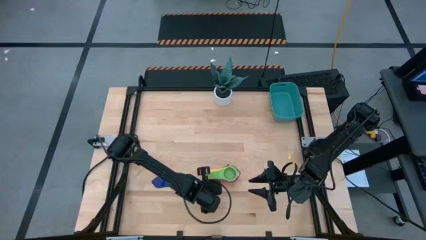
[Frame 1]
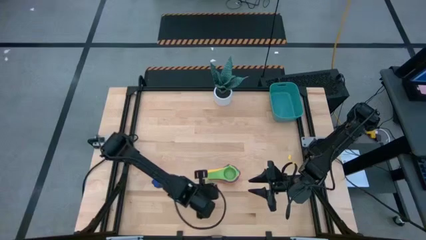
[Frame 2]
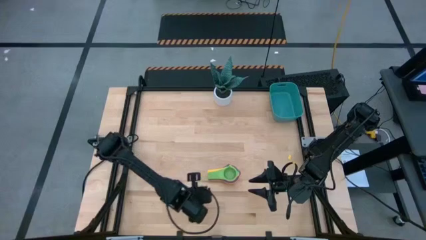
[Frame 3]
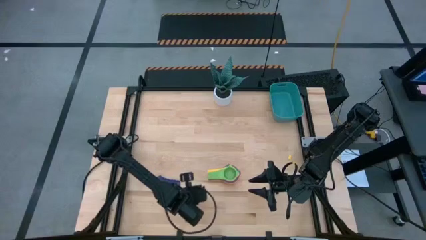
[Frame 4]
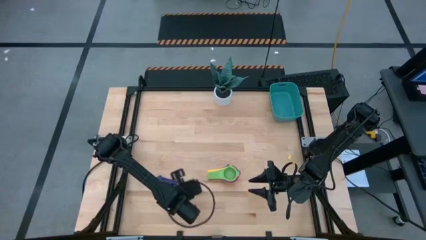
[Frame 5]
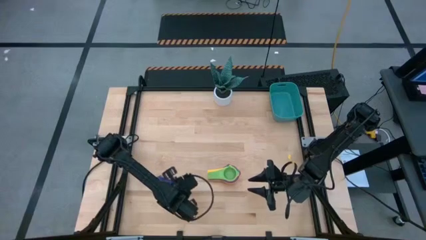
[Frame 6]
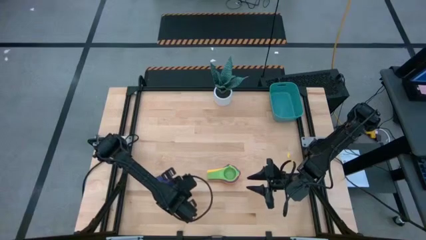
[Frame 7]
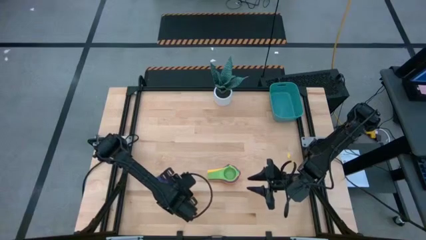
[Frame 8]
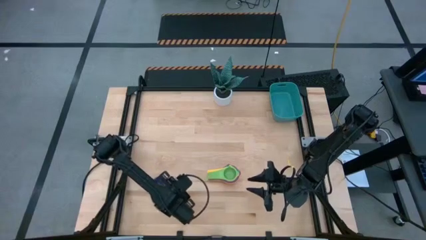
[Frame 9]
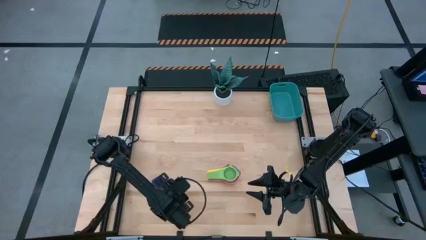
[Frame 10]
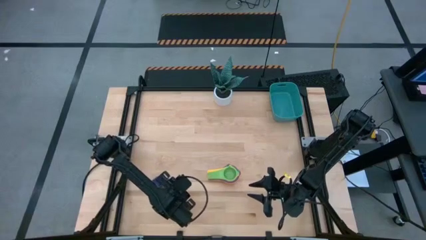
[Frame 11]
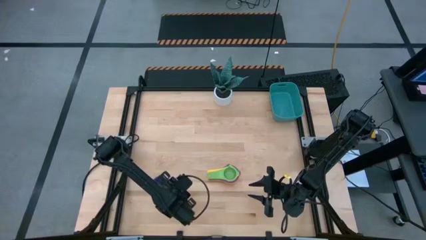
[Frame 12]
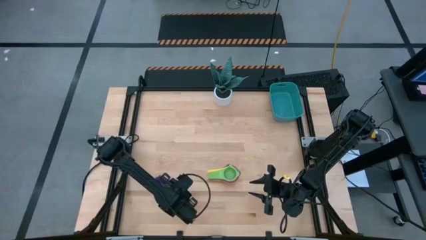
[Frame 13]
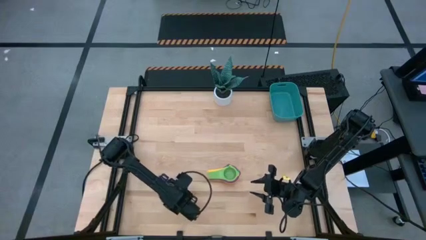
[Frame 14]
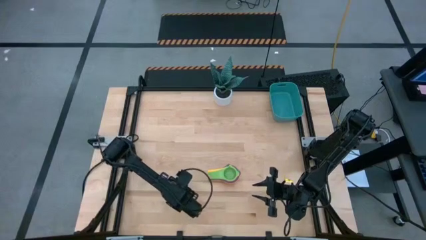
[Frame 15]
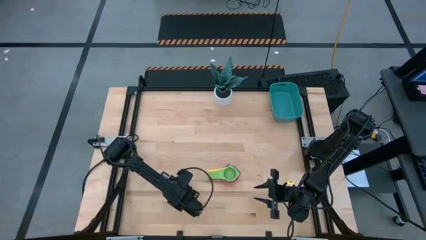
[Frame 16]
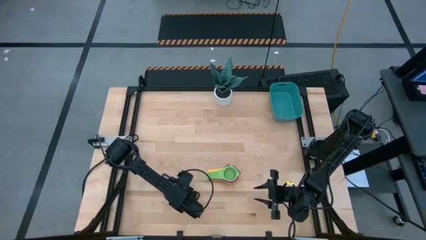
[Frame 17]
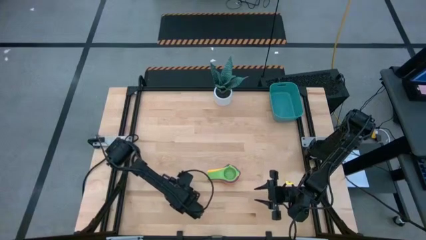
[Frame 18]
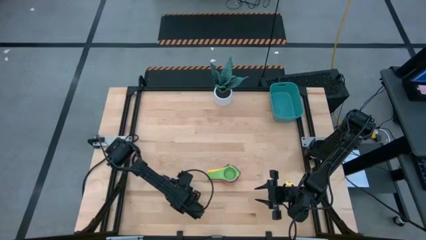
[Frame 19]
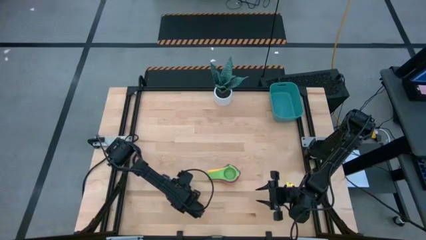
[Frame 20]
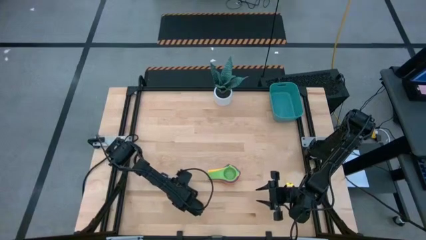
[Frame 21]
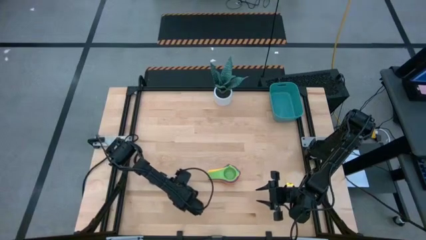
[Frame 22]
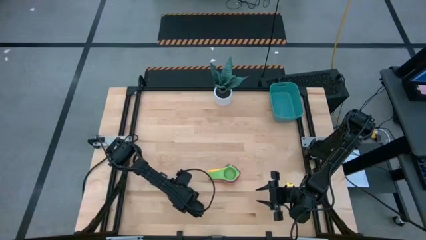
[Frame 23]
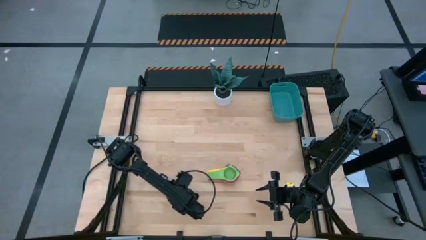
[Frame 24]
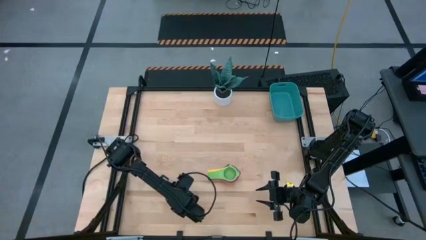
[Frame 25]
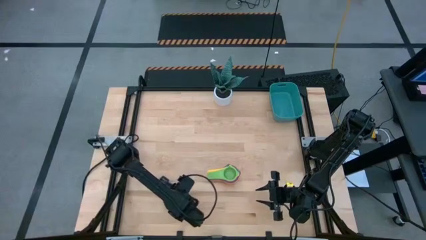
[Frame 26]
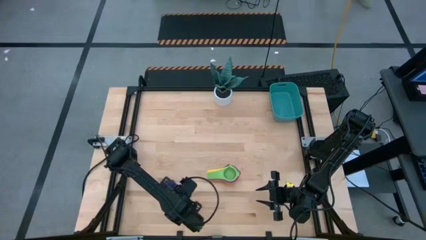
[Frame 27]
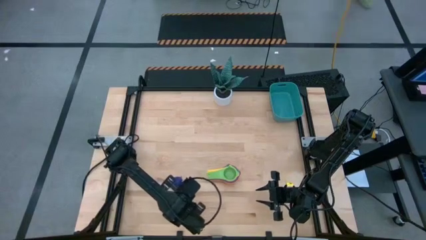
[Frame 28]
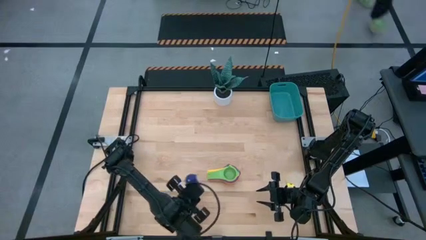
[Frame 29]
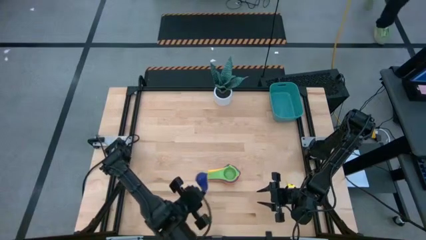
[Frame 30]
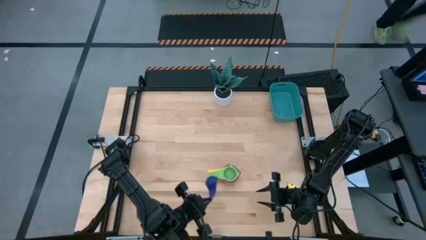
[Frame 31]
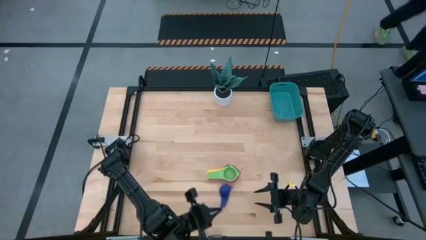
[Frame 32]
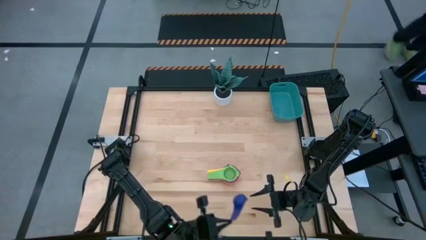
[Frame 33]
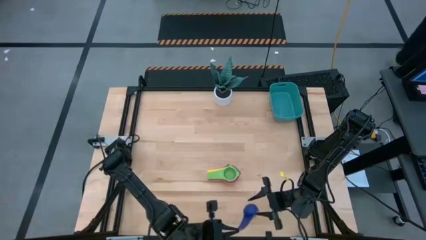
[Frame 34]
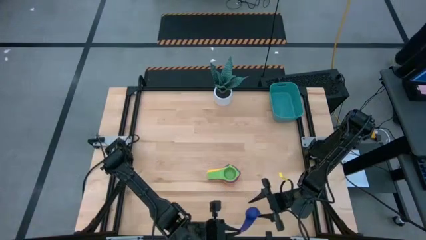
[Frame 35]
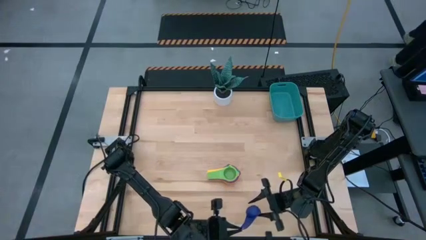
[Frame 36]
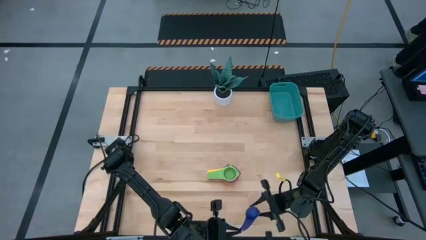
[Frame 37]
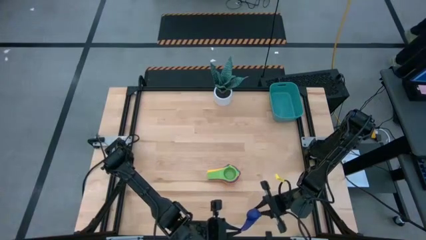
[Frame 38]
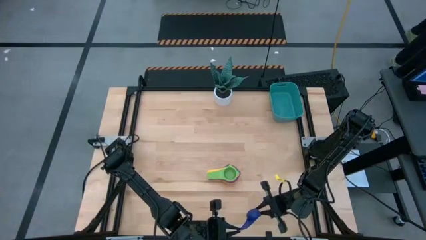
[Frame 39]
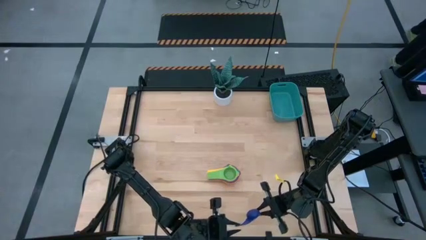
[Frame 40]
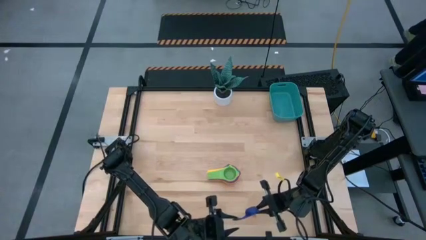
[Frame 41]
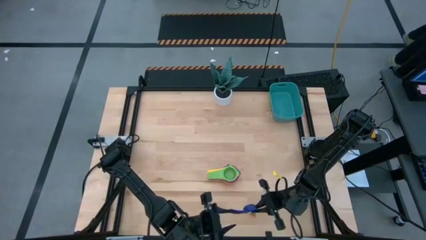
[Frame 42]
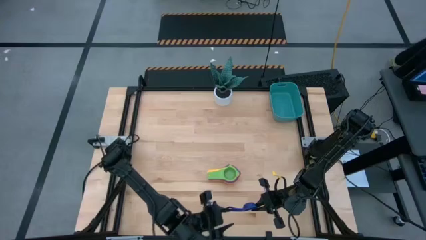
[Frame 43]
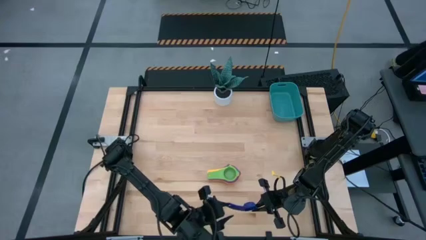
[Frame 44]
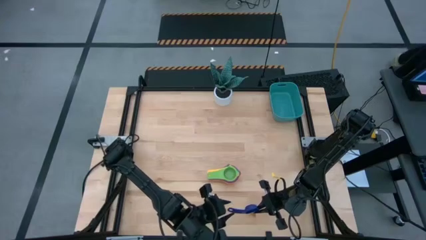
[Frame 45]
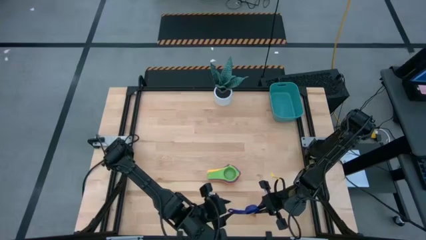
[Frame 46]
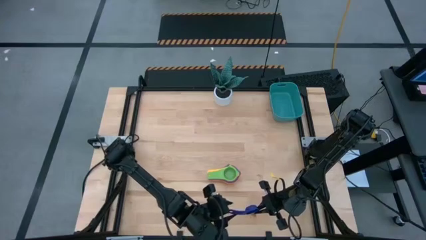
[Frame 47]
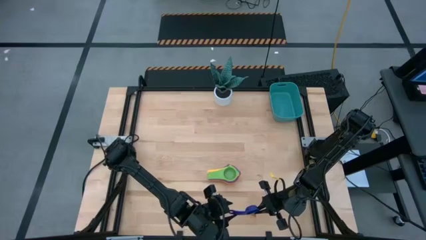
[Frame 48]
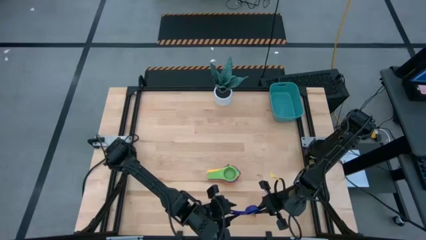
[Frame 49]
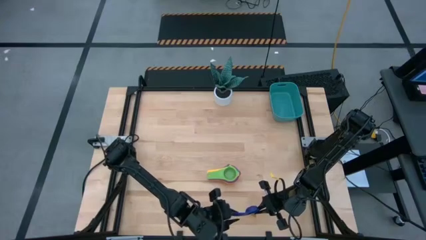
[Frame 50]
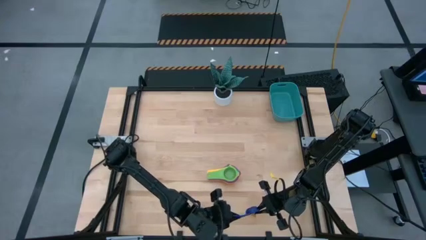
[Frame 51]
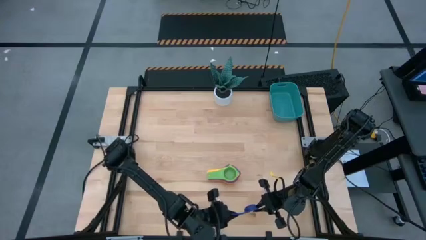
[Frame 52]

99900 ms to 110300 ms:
Task: Nest measuring cups in basket
Stack the dark blue measuring cup on top of the green measuring cup

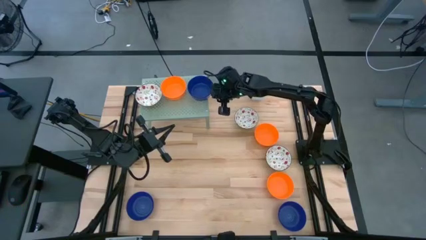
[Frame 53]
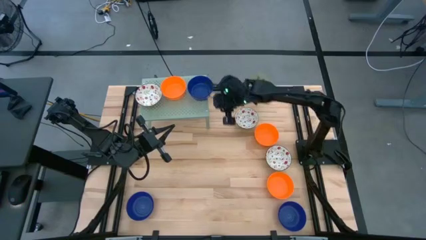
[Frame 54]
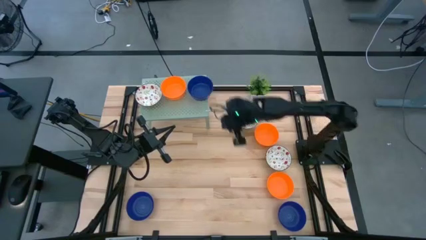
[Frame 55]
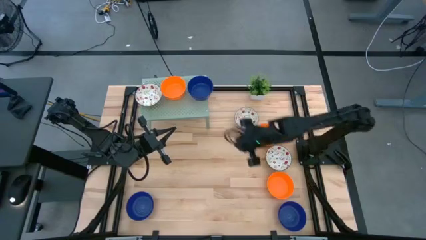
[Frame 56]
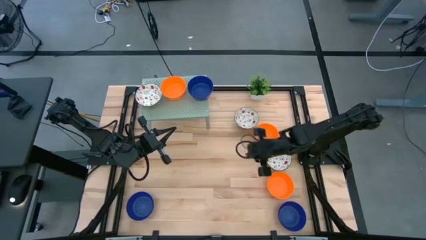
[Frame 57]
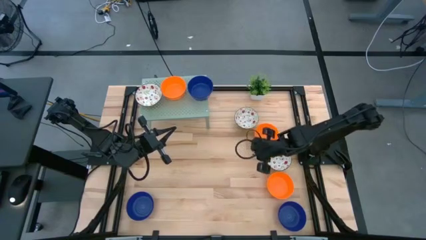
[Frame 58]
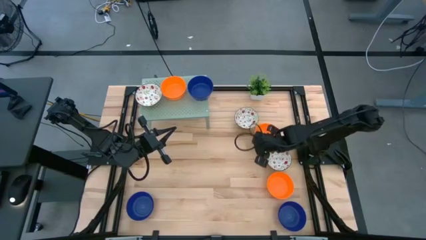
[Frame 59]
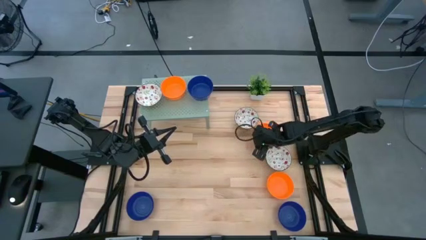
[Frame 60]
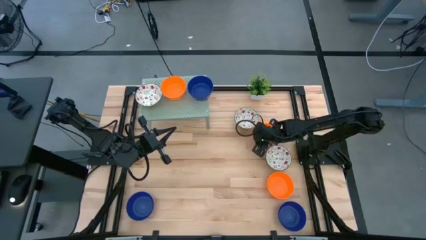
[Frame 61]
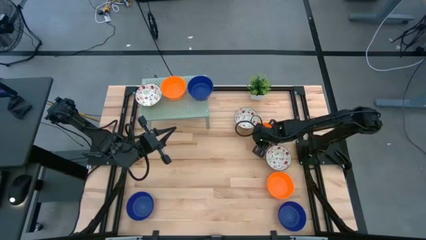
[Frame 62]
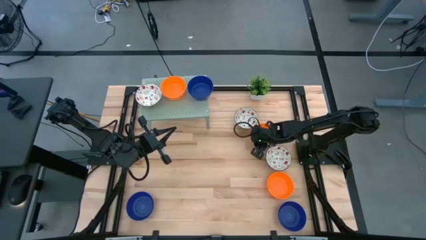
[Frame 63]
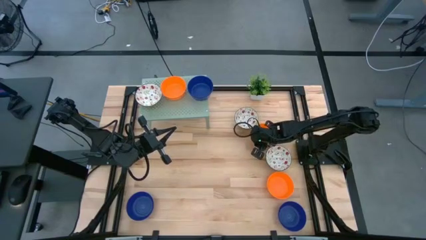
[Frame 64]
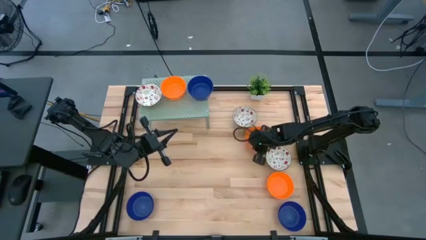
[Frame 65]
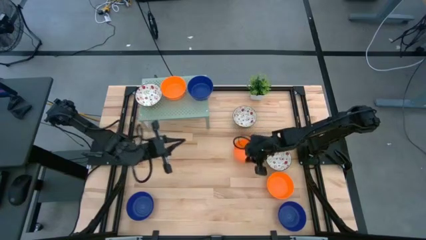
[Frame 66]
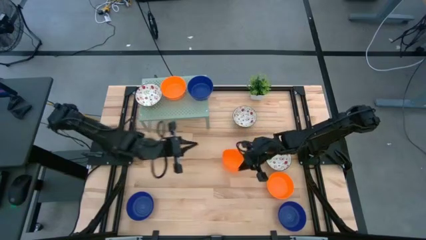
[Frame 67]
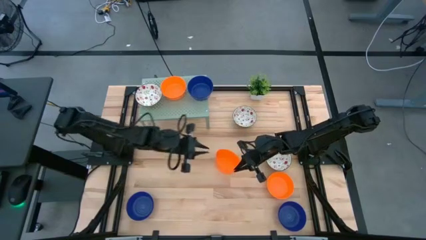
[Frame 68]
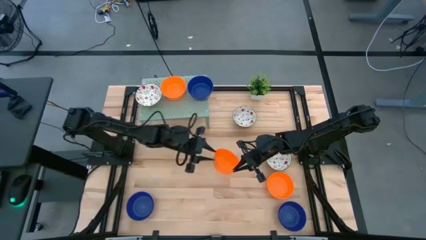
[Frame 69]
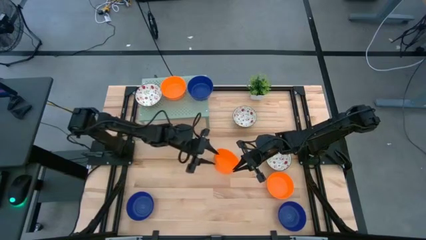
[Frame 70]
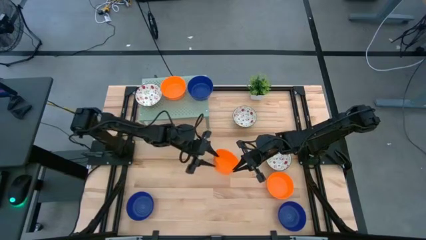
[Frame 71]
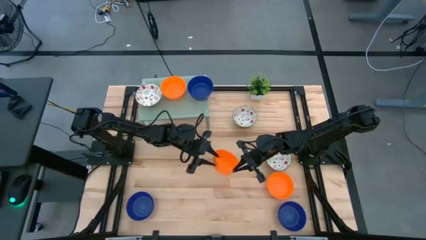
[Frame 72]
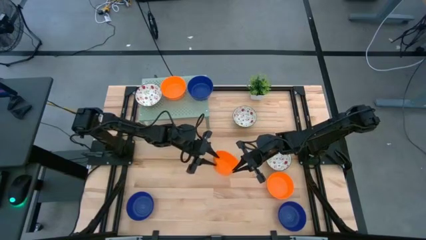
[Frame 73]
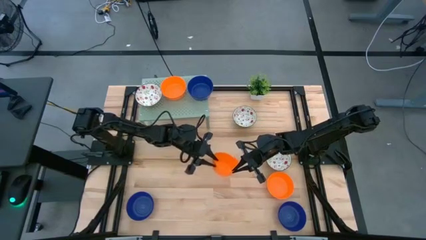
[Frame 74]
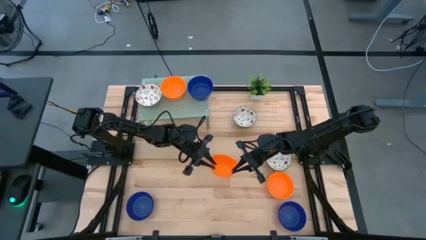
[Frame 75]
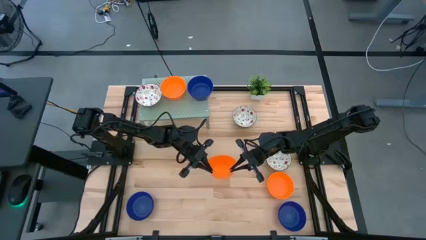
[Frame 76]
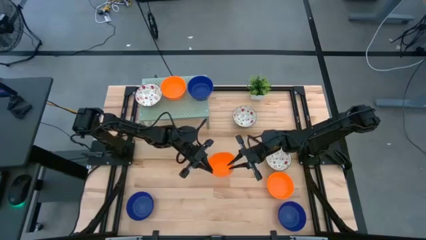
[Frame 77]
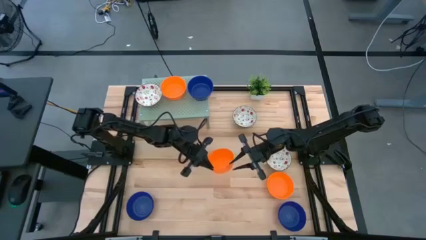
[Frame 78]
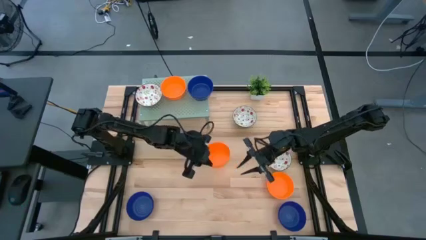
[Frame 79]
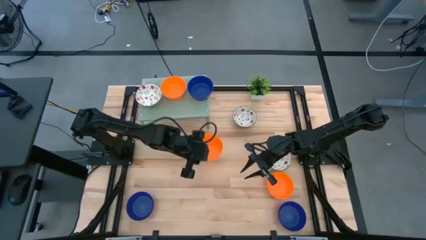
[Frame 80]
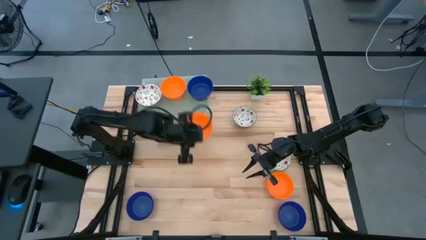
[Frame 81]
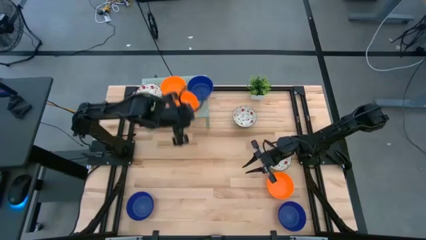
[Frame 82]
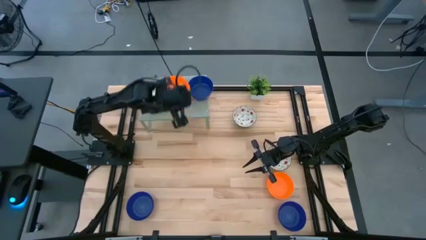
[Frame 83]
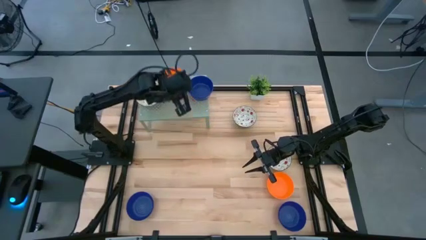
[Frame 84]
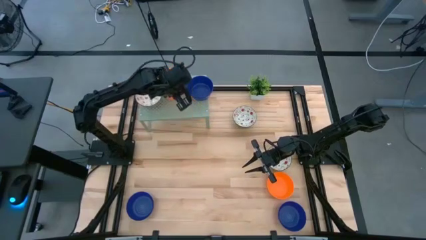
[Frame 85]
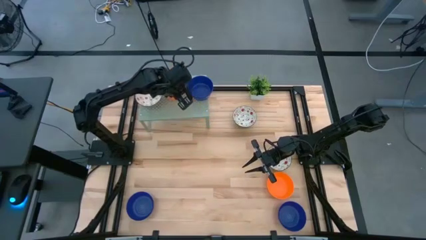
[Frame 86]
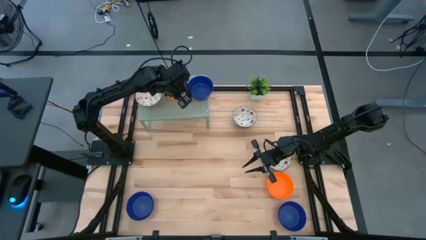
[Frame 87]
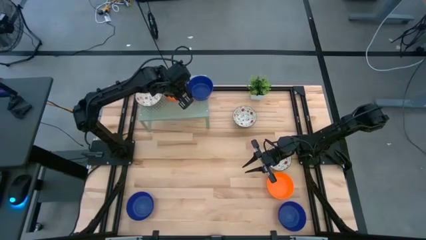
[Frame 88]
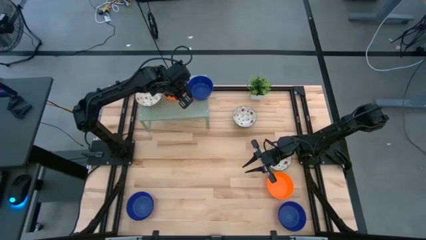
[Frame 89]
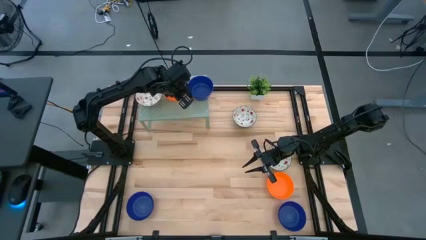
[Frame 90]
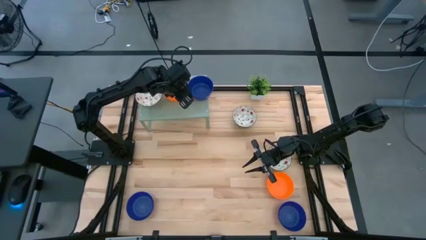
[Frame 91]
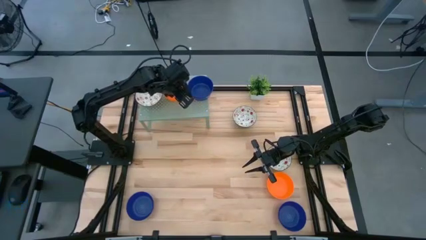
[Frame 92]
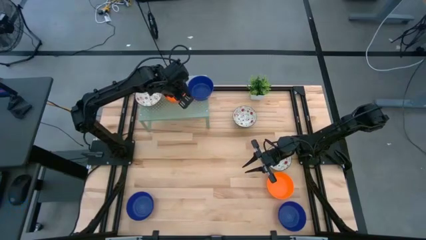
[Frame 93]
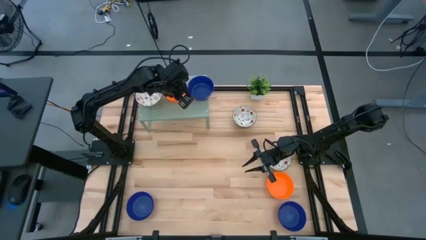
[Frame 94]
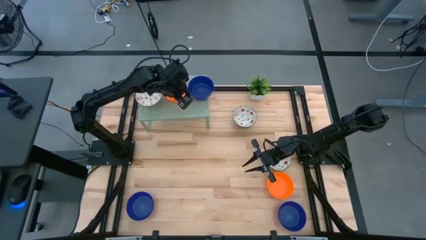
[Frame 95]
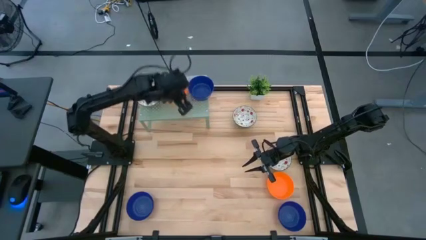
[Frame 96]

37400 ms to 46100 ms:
Task: Pick & Place Mini bowls
Stack the orange bowl on top of the other orange bowl on the shelf
